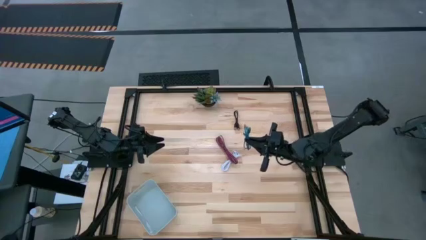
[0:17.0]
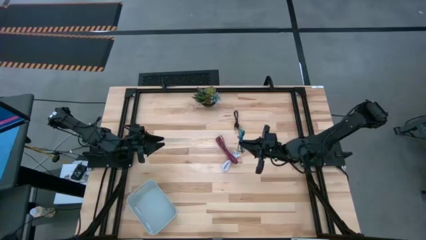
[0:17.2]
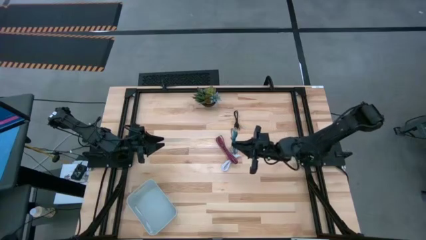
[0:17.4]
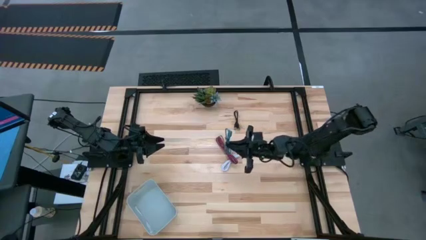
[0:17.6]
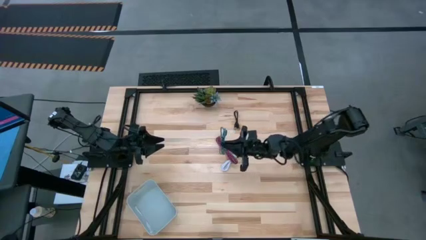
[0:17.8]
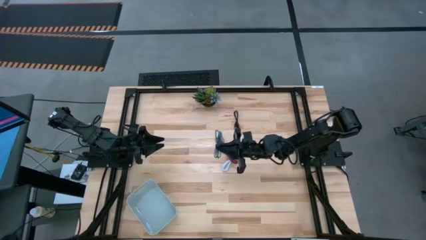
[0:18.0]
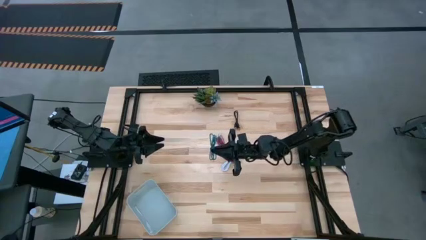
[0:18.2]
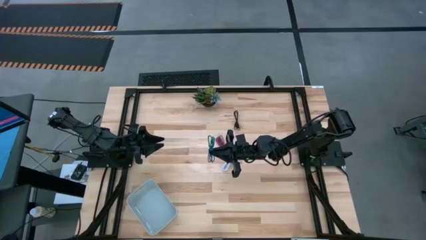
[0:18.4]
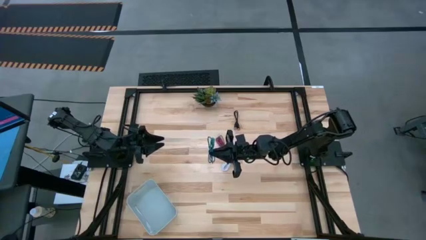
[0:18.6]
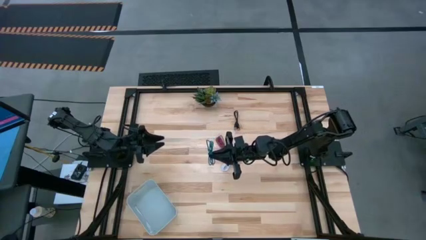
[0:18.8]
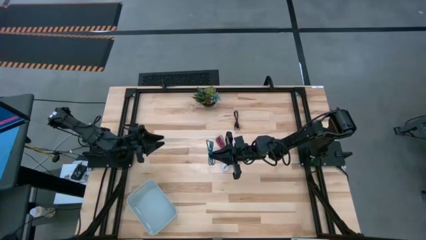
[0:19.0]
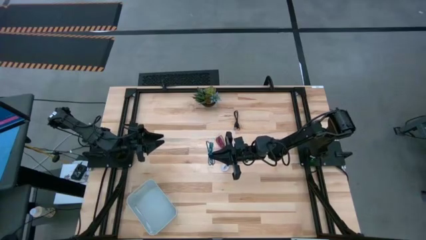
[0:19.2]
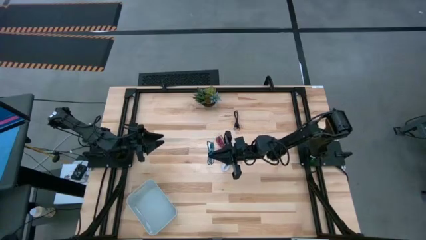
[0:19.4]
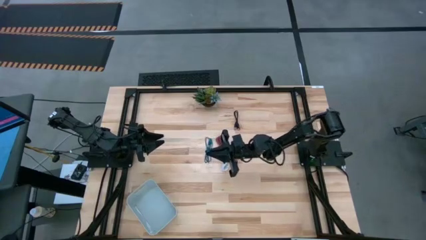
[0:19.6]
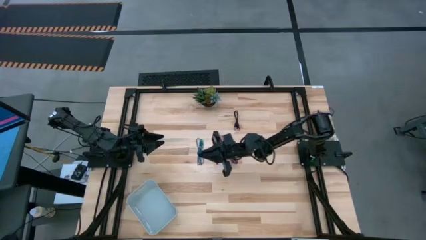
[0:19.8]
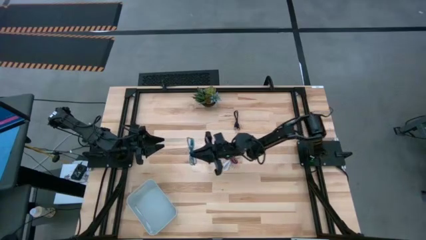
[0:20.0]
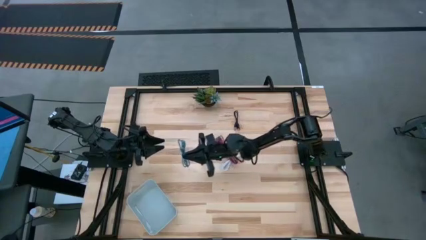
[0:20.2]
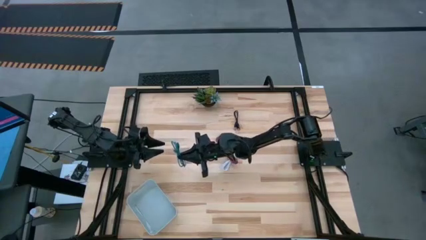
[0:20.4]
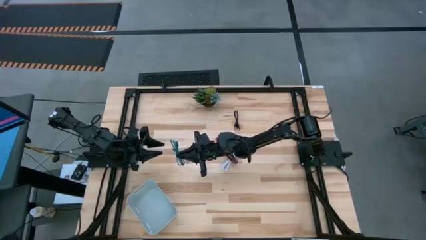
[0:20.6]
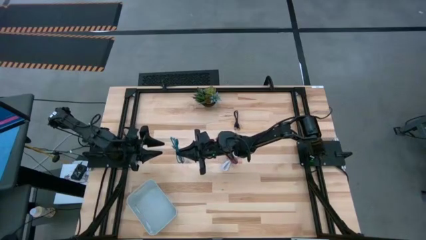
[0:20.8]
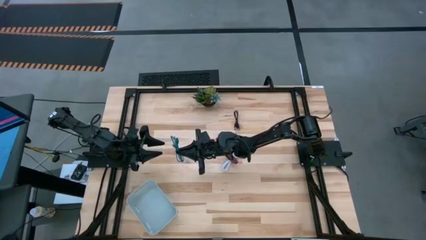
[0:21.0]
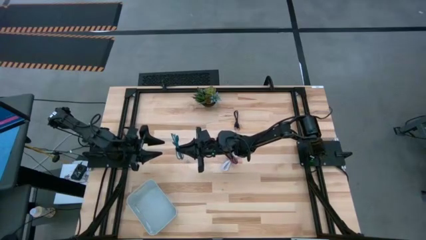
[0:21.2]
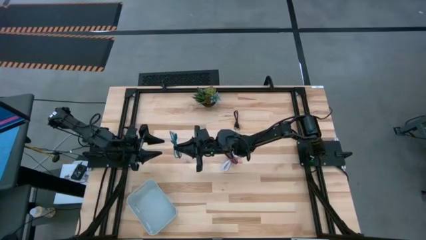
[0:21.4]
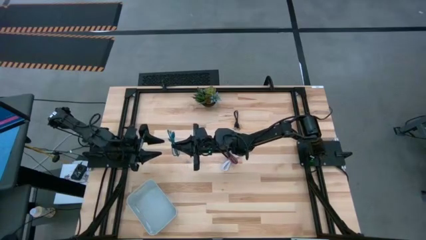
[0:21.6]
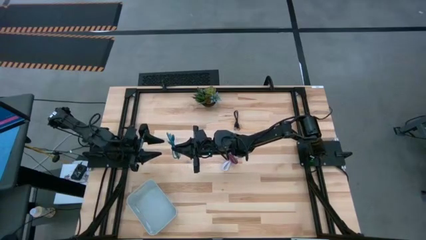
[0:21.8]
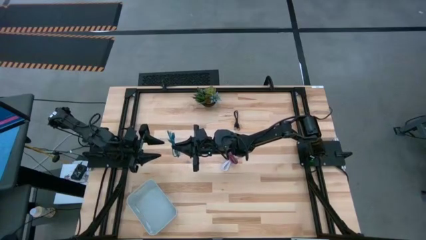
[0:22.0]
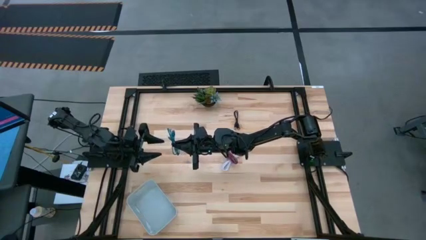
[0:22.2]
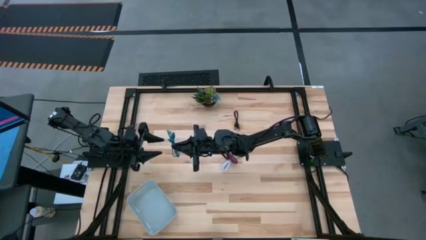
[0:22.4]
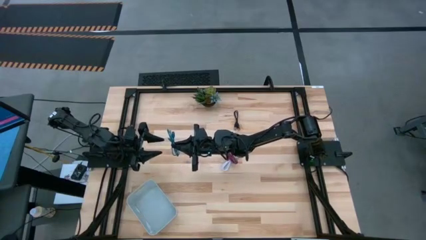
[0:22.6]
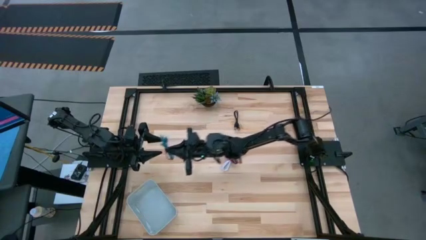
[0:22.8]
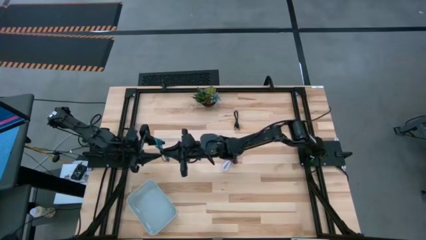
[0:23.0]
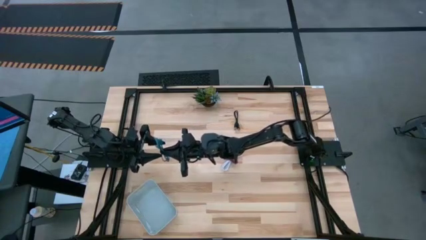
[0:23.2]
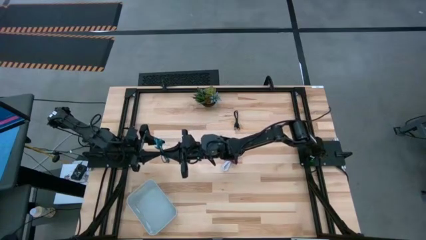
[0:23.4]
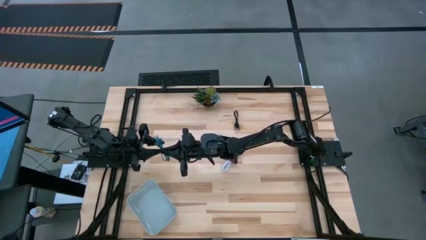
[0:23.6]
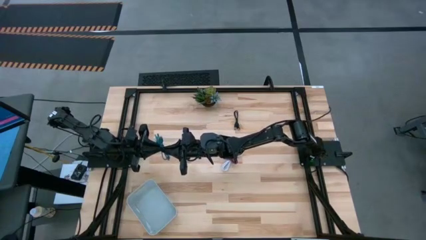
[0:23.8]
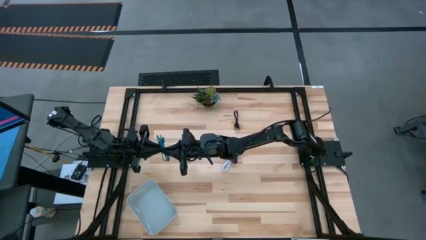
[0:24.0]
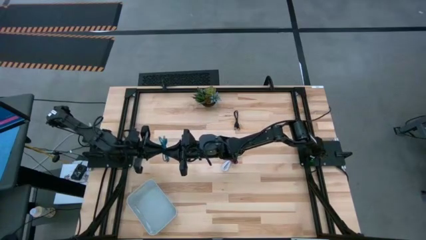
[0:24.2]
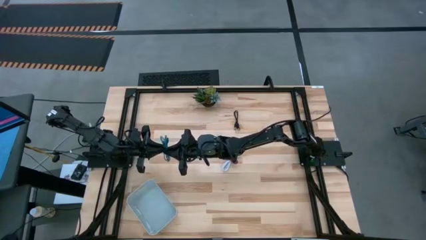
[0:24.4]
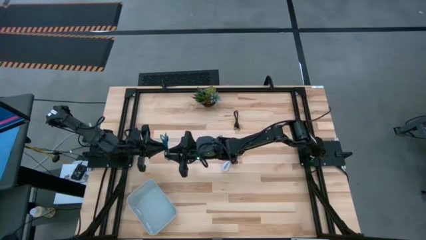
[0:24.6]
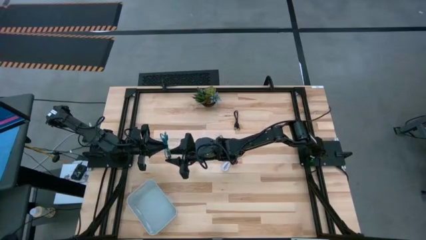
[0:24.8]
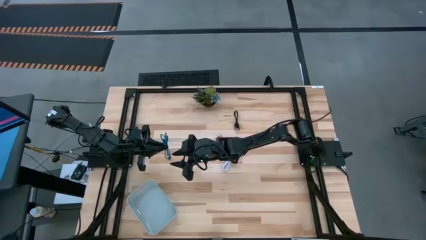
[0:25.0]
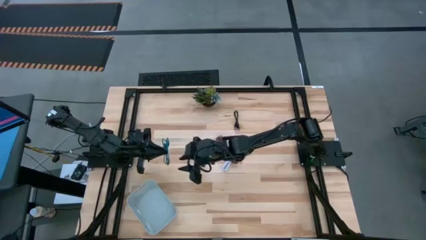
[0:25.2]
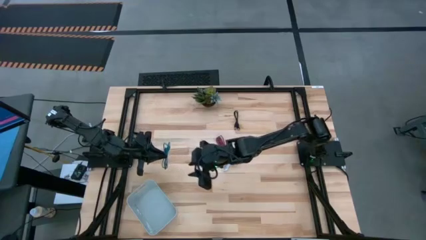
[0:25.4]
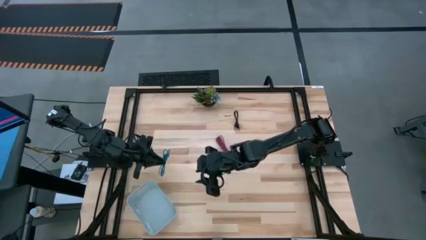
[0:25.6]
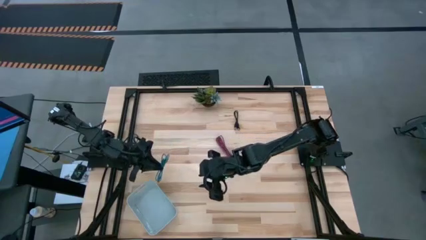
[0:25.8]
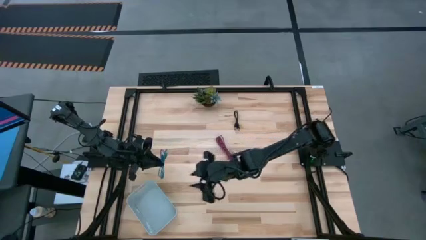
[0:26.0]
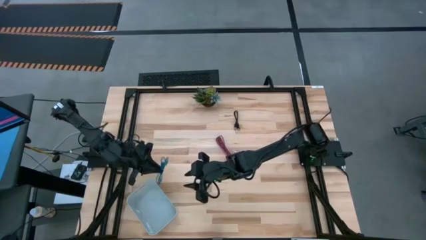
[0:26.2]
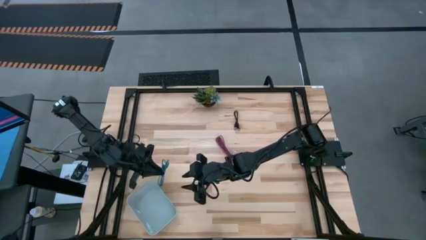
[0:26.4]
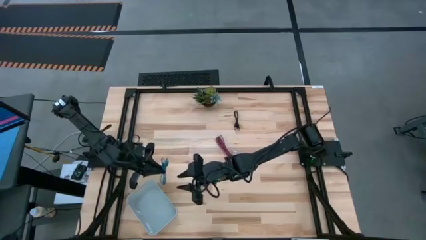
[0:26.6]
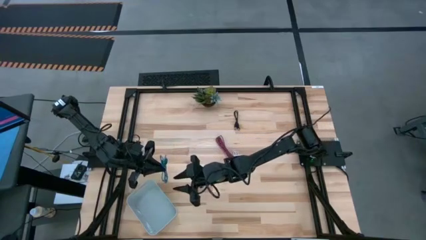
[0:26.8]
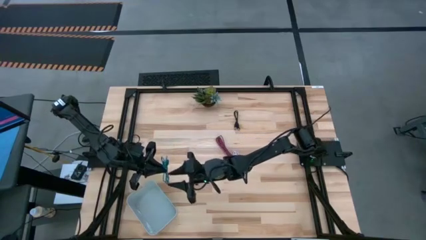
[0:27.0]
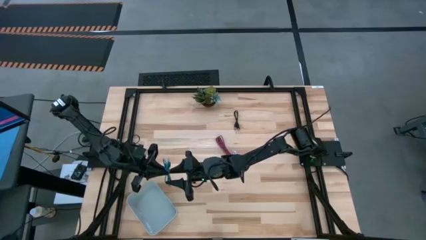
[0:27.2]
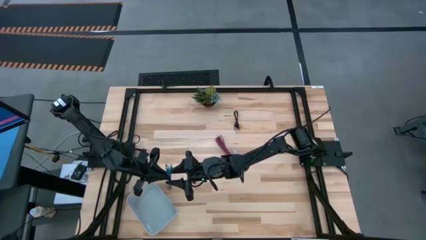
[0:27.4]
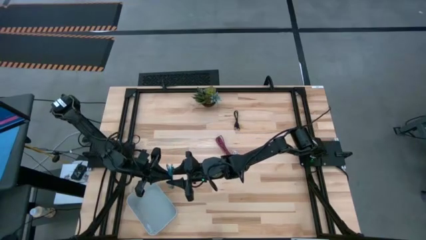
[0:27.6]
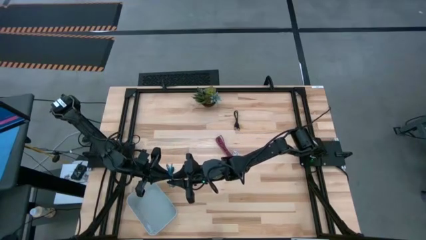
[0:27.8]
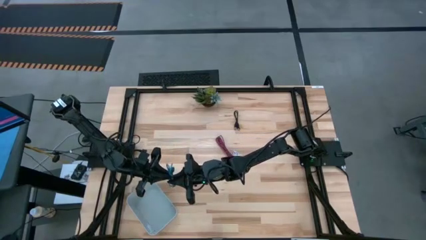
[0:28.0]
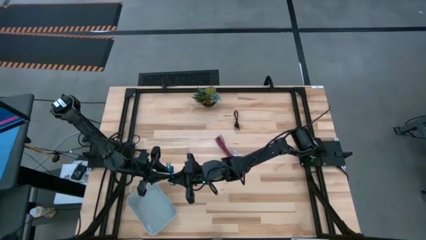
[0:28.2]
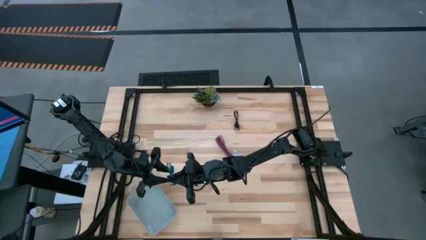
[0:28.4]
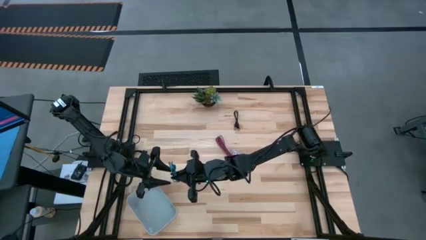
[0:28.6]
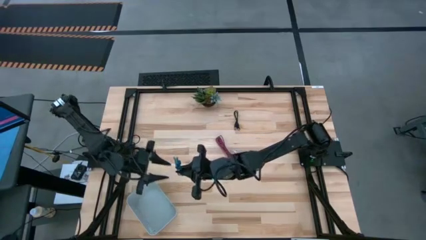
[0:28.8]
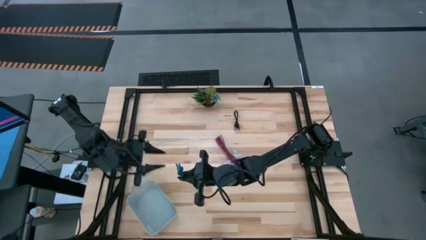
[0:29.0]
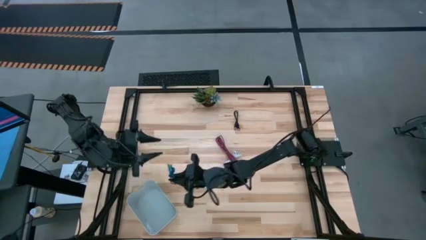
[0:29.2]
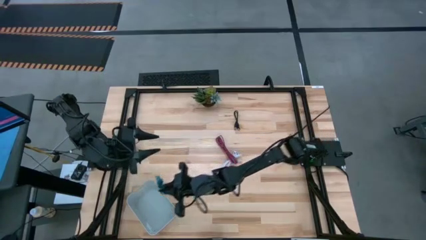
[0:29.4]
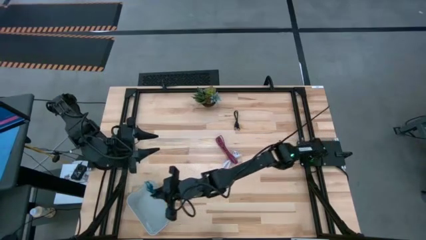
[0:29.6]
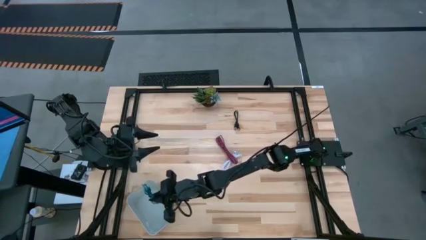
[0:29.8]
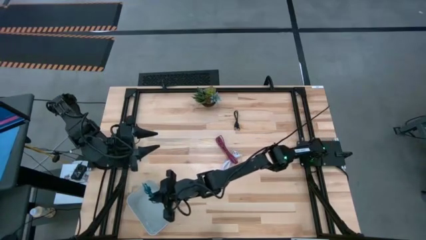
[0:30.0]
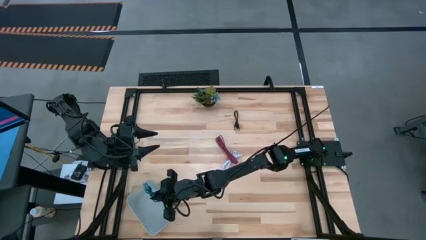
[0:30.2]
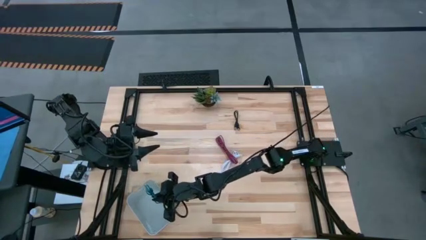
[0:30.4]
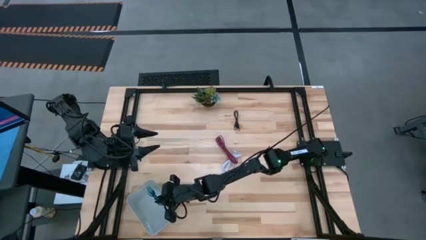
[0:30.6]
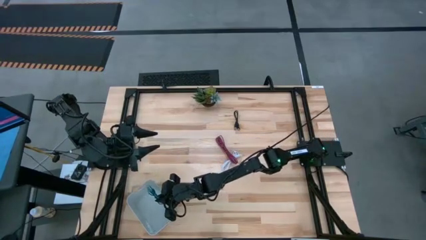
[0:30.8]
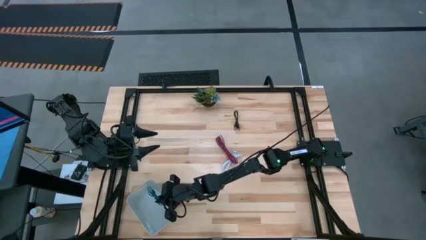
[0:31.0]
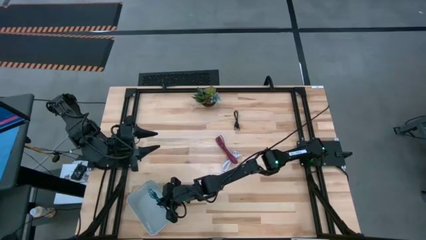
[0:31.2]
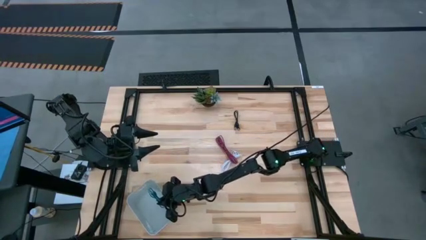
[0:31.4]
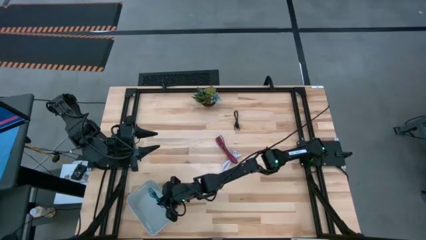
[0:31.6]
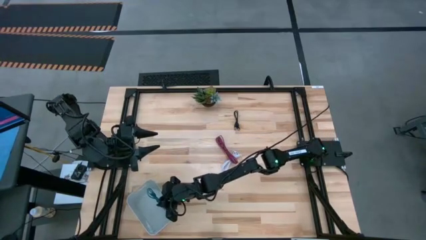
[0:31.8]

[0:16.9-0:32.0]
Task: Pick and place USB-C Cables
Put the blue charger cable into the gray bin
